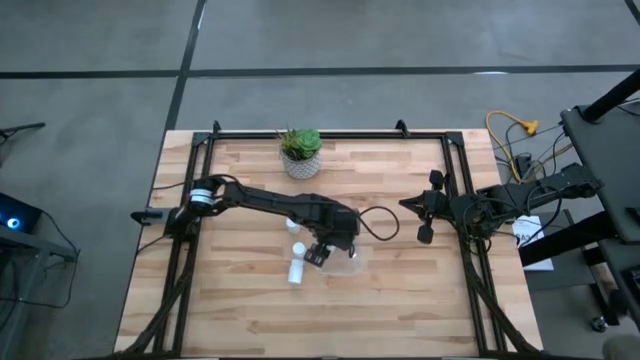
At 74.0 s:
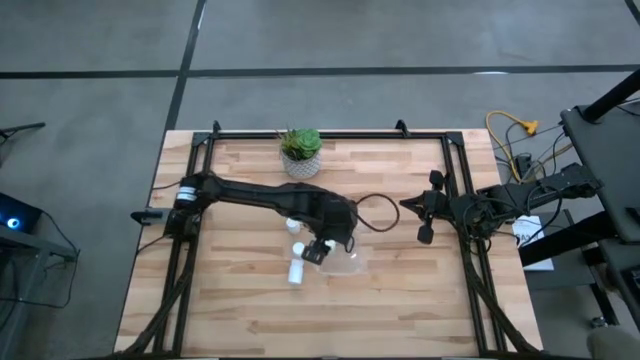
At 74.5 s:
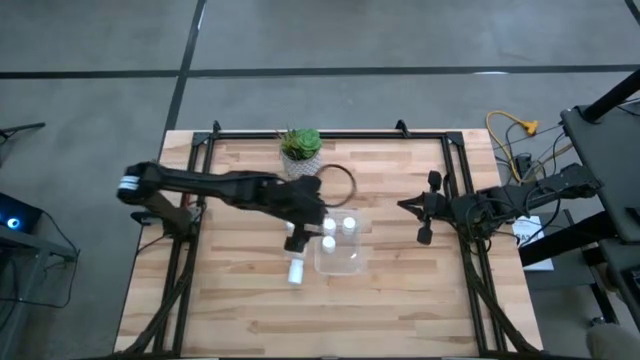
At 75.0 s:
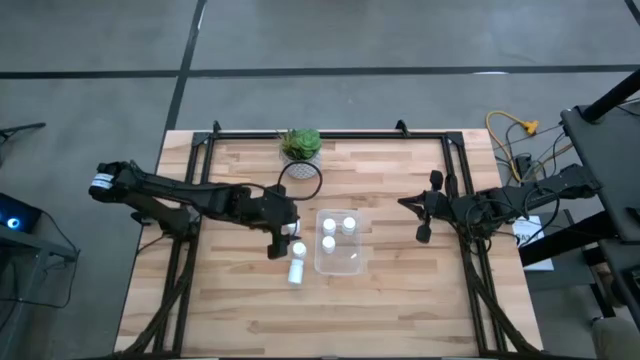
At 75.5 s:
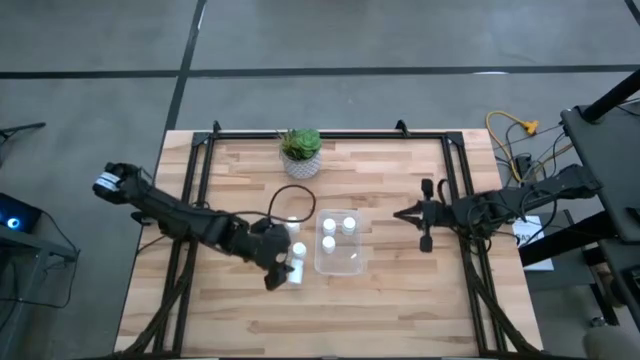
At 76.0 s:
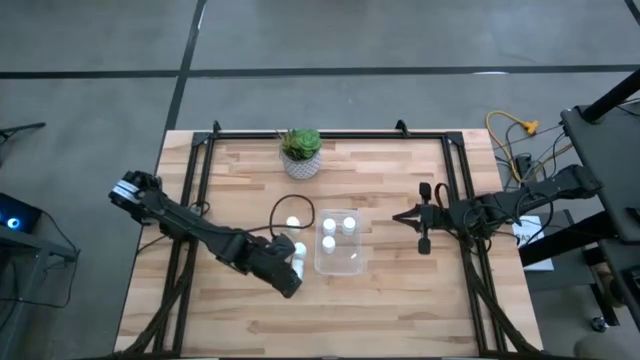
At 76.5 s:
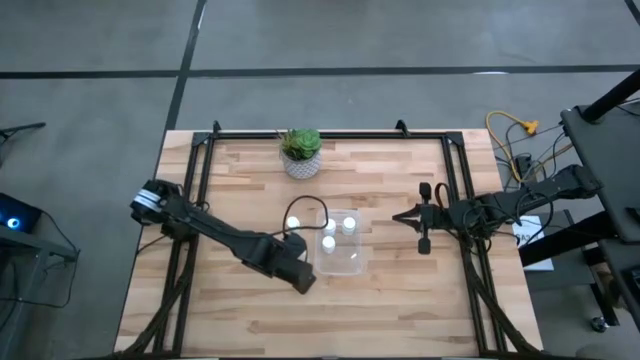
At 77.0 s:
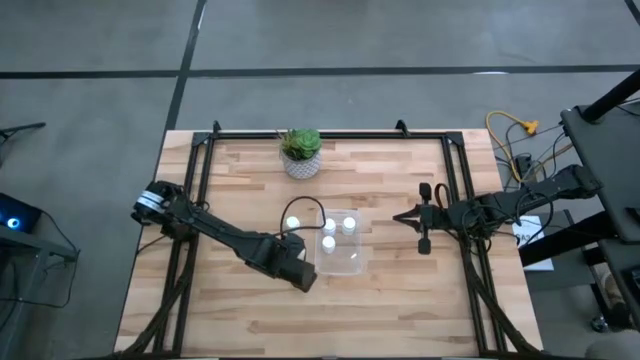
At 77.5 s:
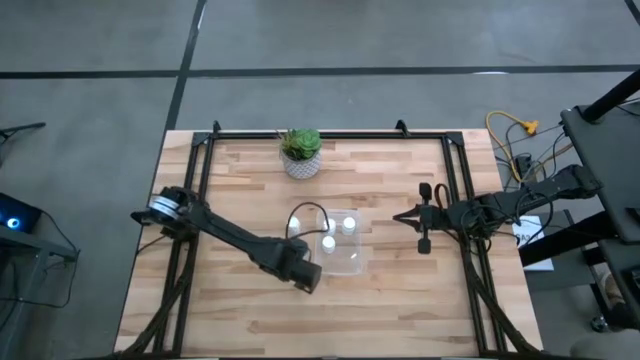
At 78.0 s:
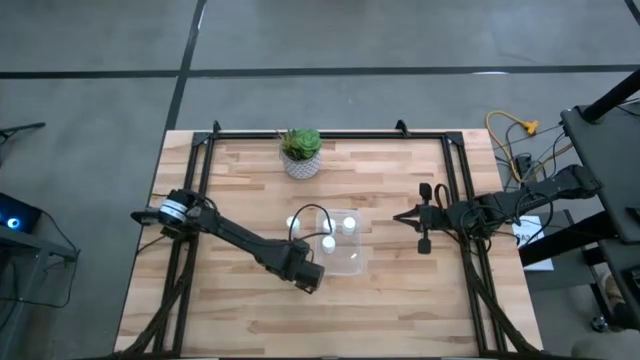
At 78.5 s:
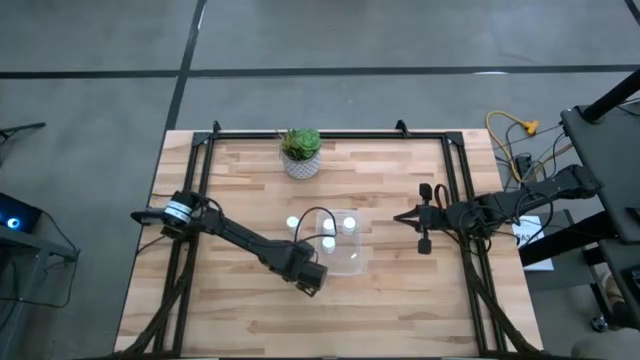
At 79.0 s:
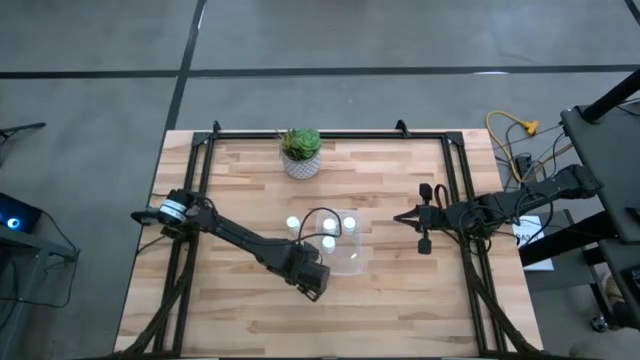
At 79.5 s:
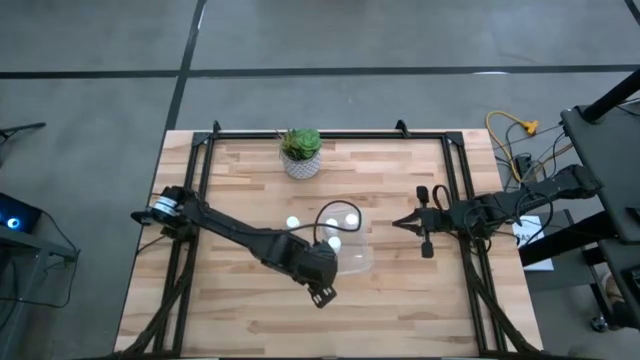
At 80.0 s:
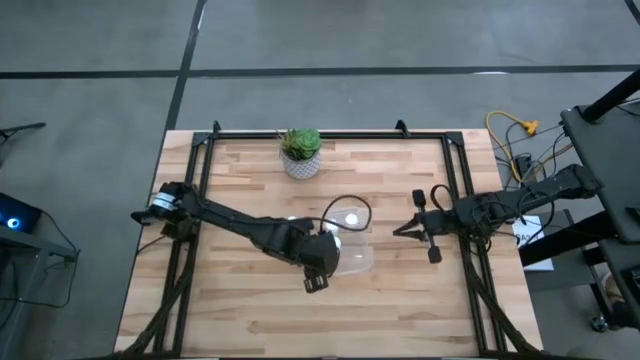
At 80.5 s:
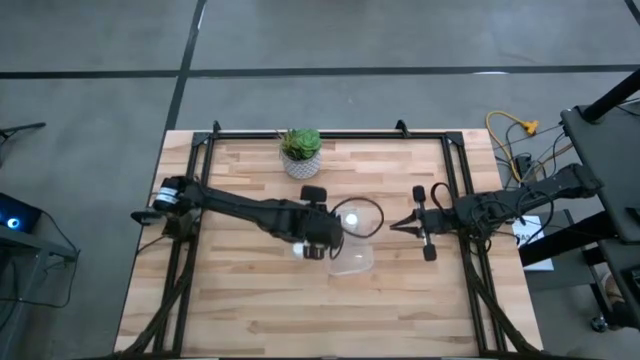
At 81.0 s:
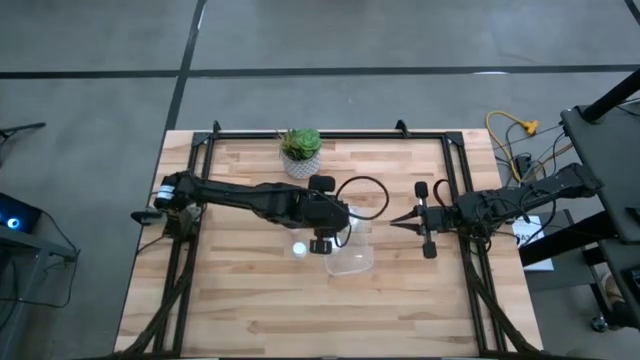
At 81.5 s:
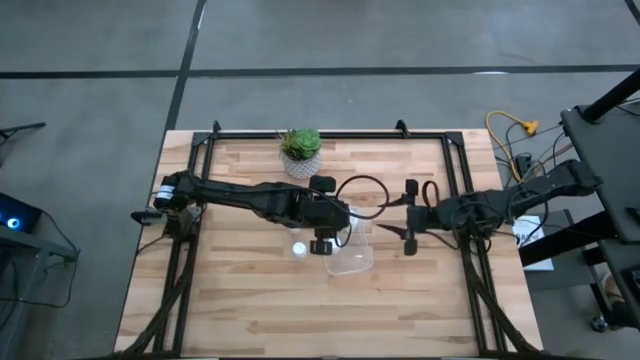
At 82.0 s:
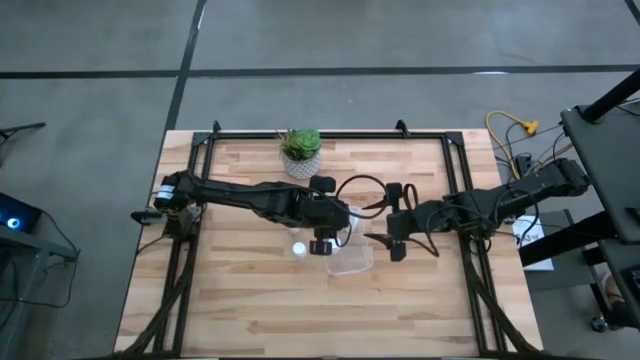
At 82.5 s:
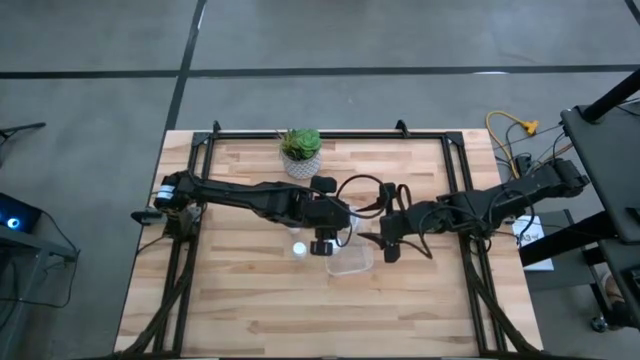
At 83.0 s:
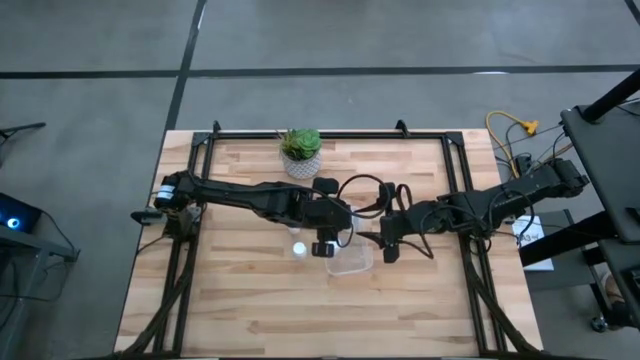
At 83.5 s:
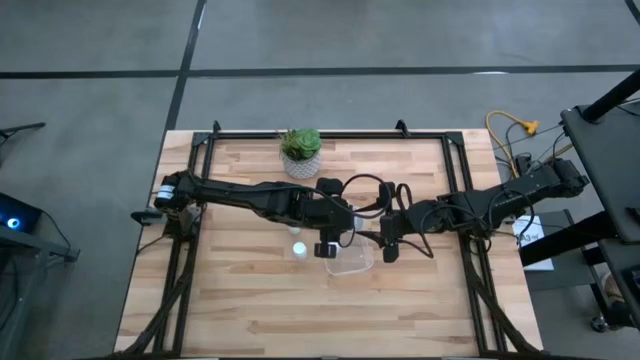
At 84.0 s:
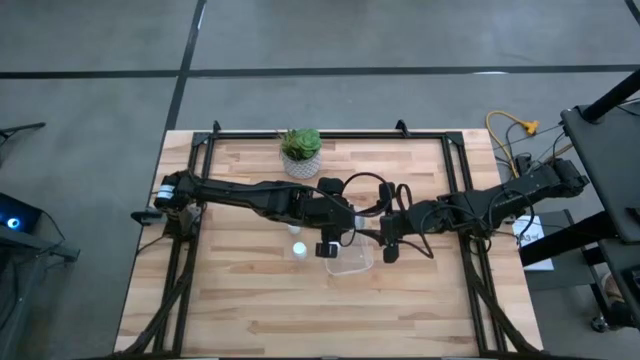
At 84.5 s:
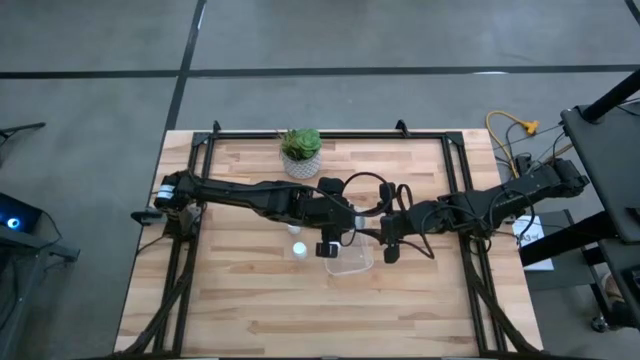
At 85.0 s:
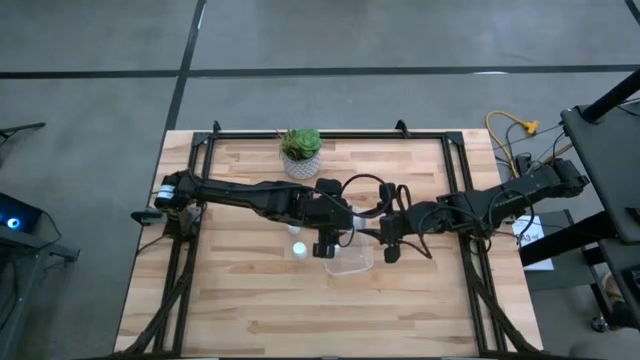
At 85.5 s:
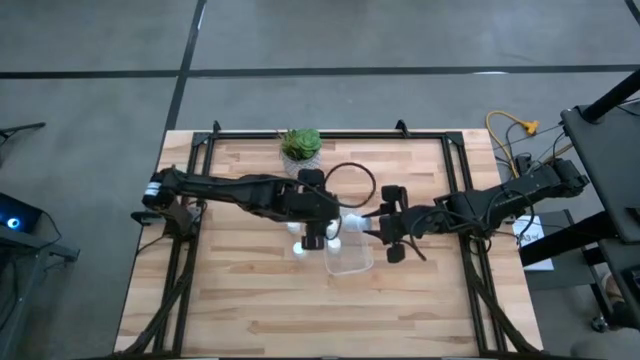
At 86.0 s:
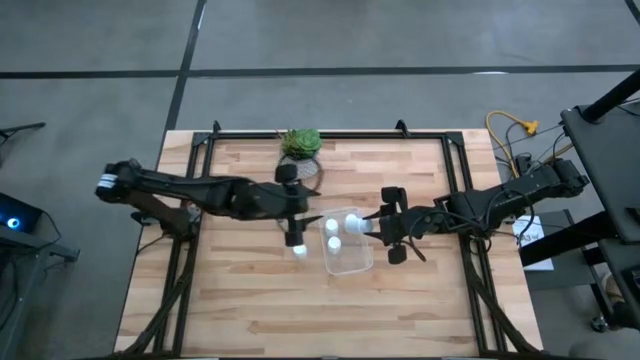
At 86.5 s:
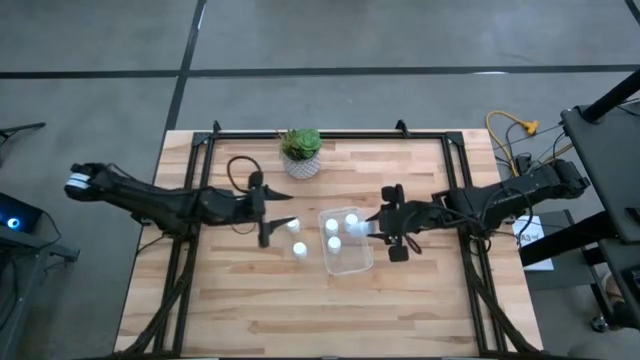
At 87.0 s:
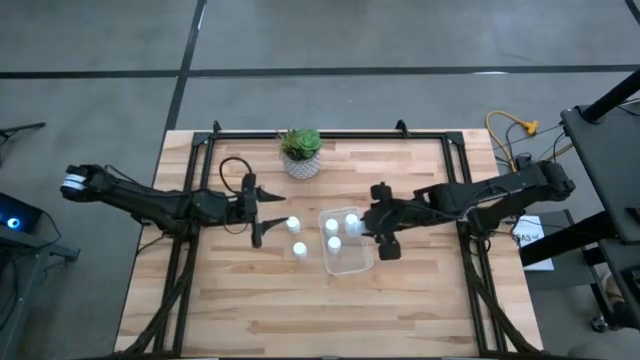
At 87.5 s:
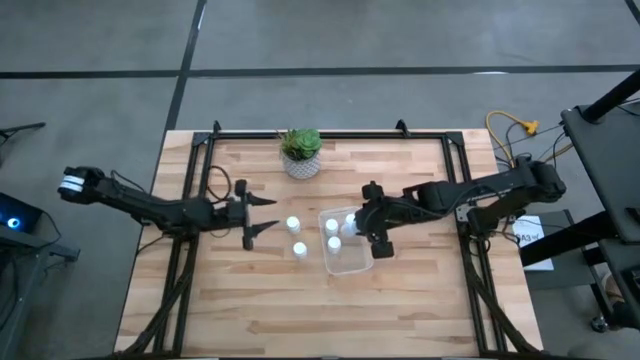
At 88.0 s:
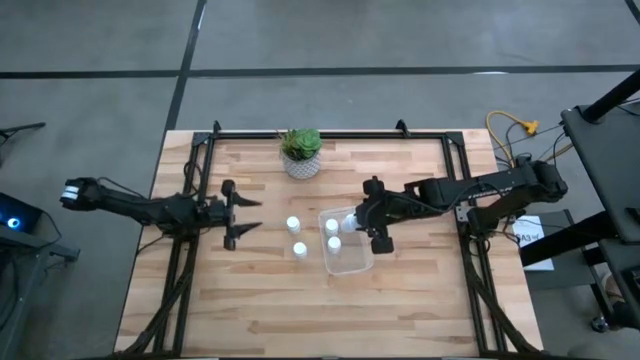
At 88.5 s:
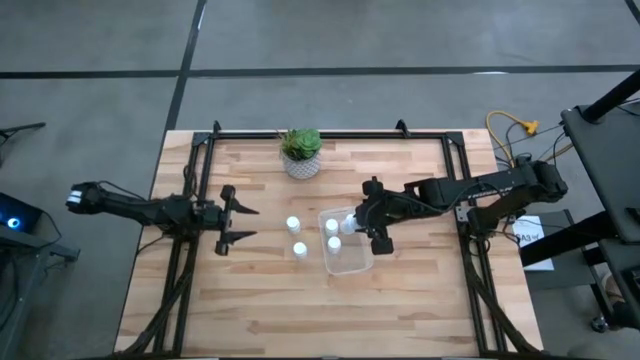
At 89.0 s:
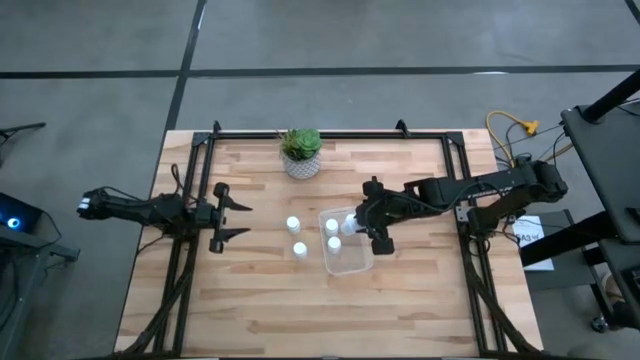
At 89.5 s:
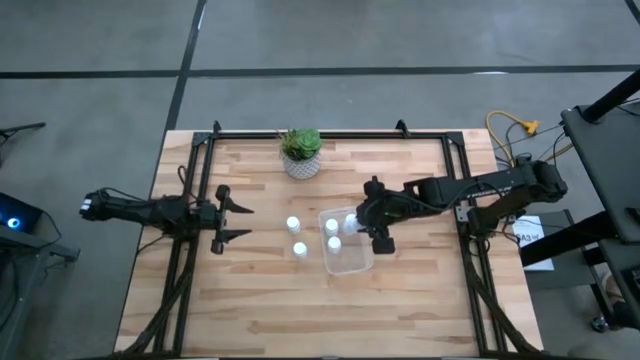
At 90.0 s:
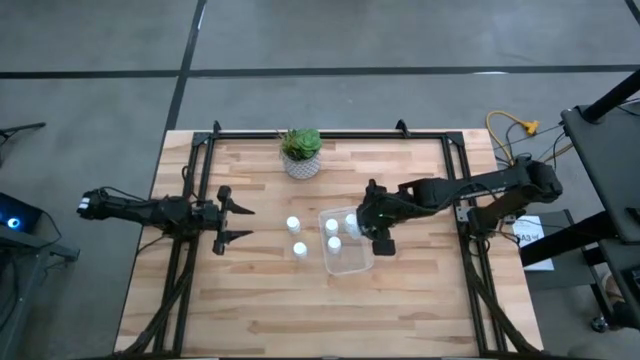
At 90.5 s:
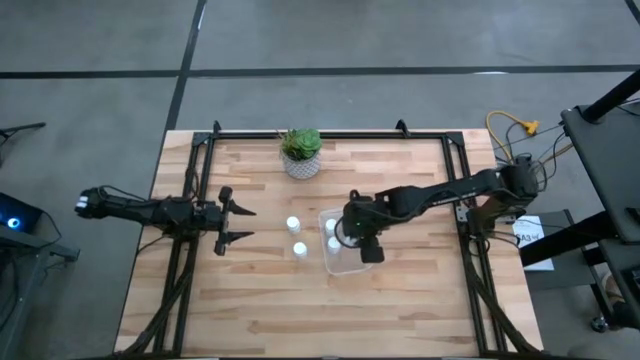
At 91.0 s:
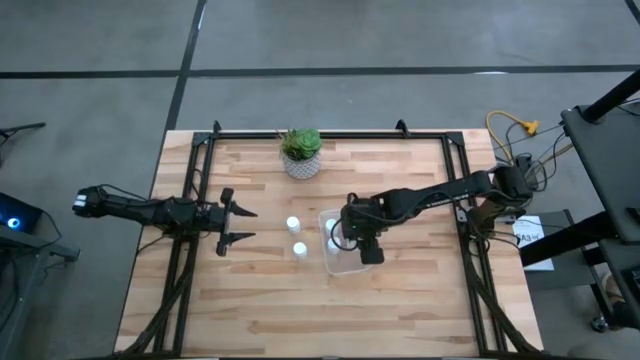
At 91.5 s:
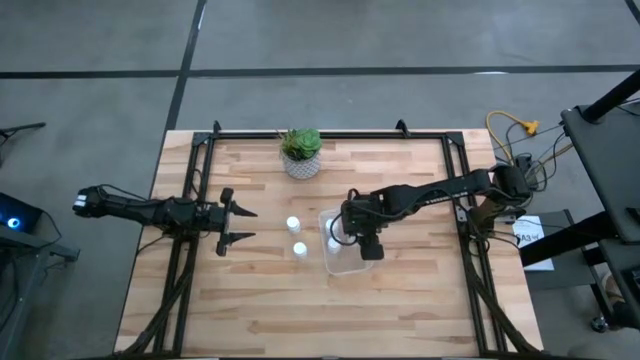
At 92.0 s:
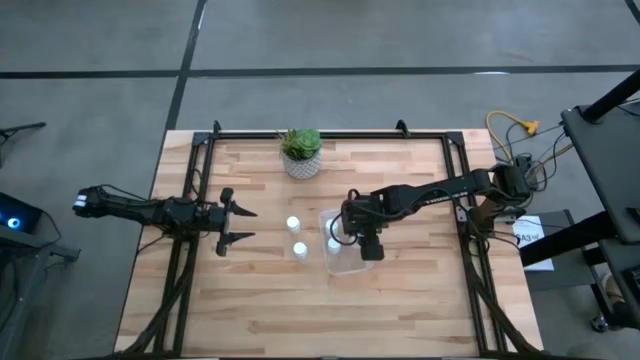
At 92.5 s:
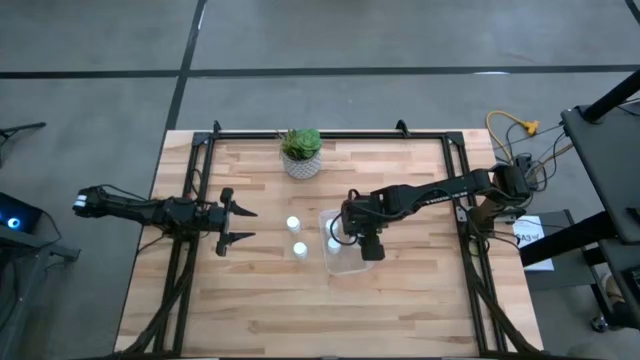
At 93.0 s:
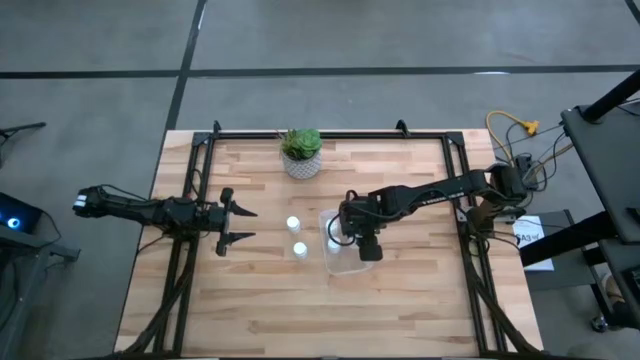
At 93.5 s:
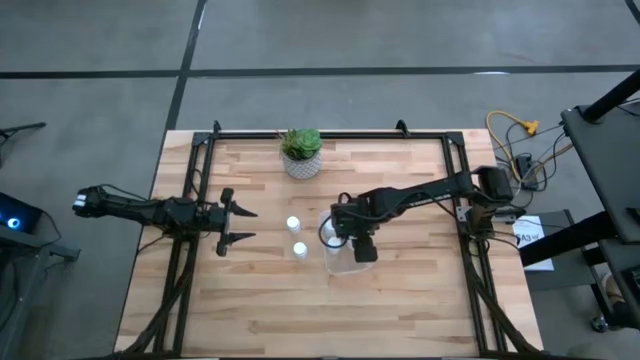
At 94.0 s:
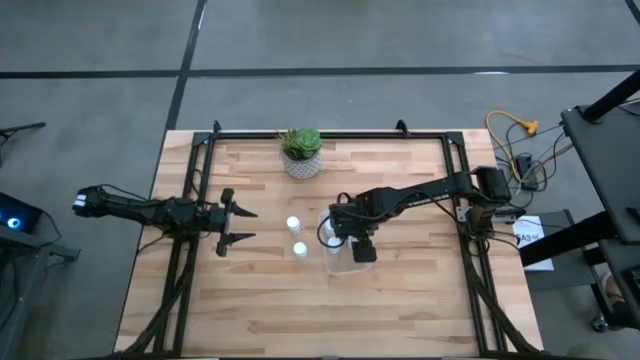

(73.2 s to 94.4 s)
Task: Pick and place pill bottles into a basket
Put the white medicine bottle into the transparent bin
